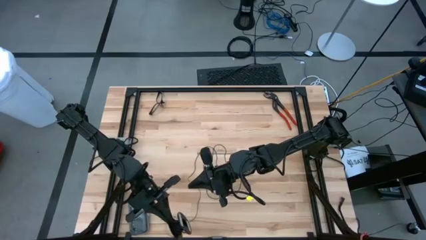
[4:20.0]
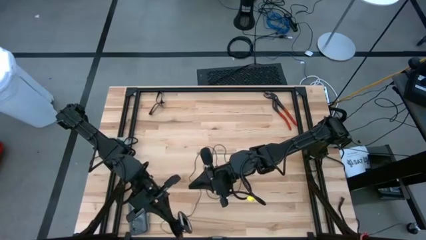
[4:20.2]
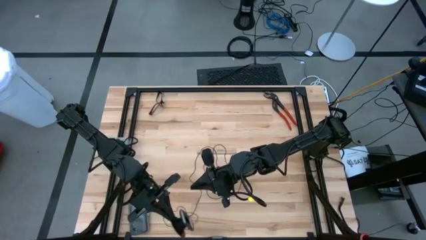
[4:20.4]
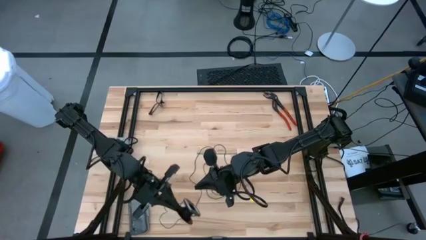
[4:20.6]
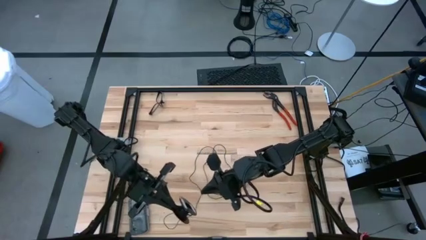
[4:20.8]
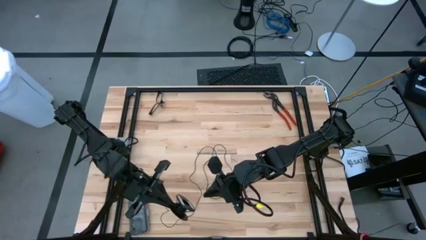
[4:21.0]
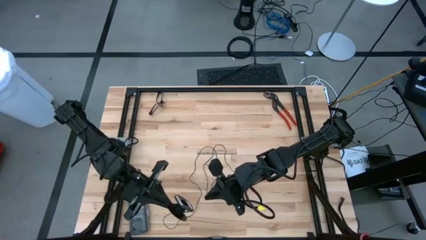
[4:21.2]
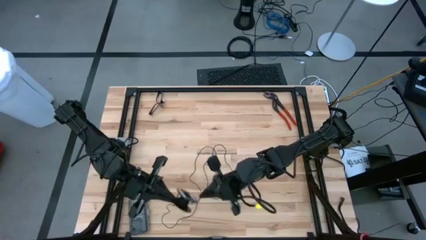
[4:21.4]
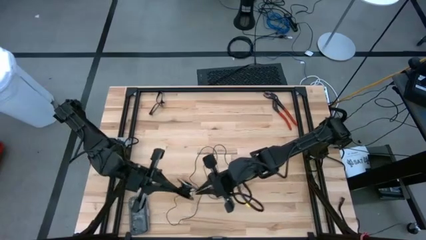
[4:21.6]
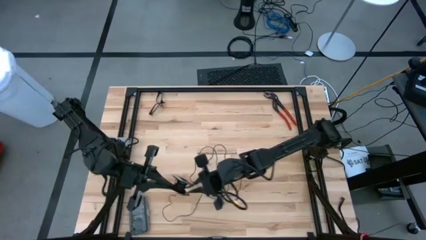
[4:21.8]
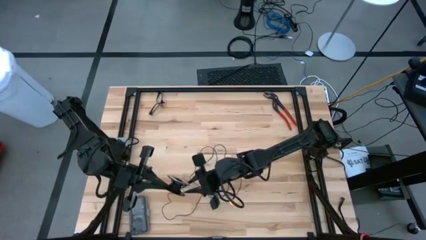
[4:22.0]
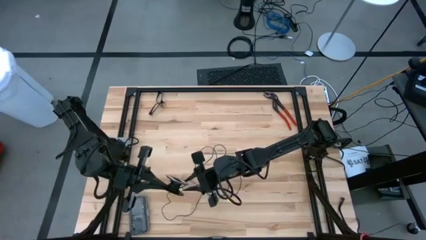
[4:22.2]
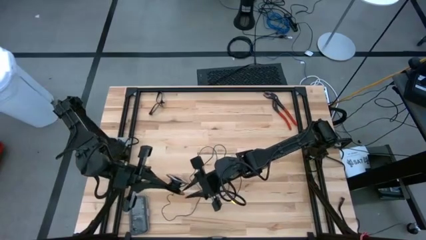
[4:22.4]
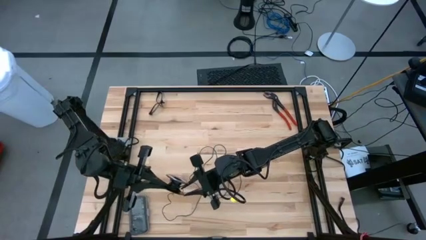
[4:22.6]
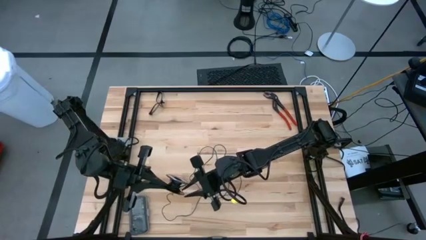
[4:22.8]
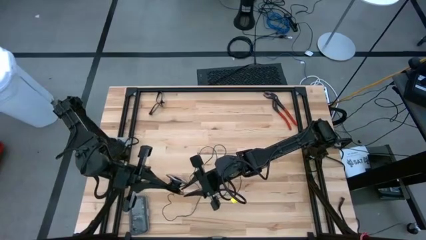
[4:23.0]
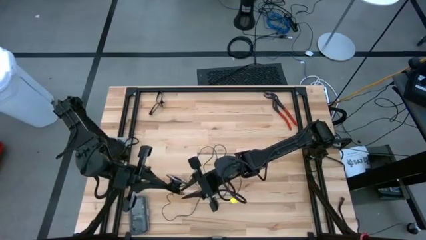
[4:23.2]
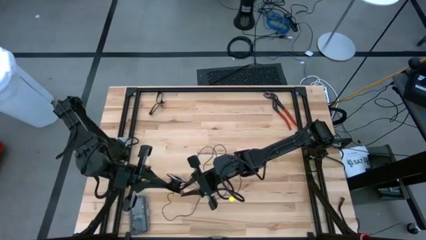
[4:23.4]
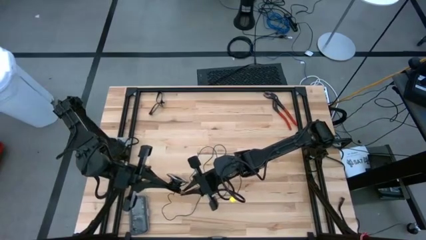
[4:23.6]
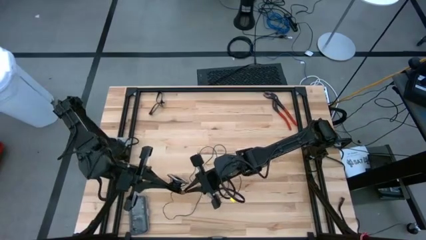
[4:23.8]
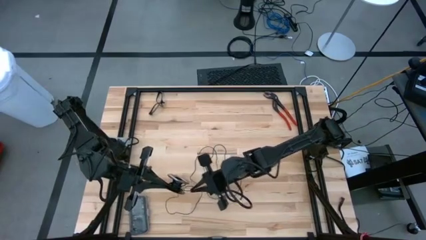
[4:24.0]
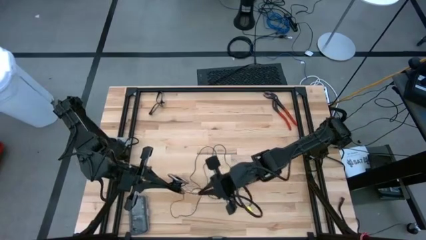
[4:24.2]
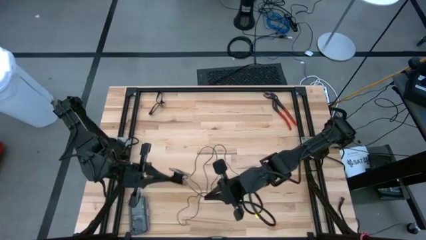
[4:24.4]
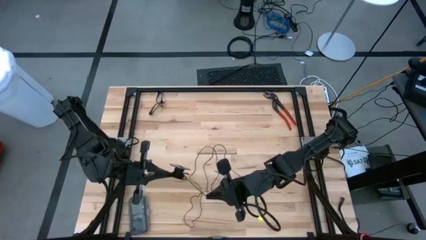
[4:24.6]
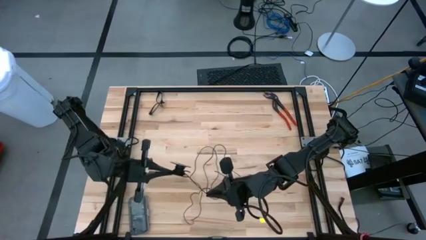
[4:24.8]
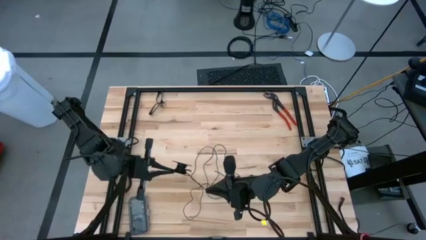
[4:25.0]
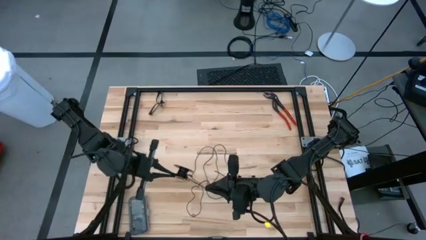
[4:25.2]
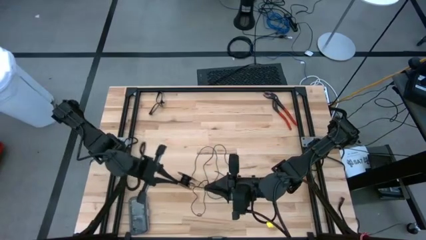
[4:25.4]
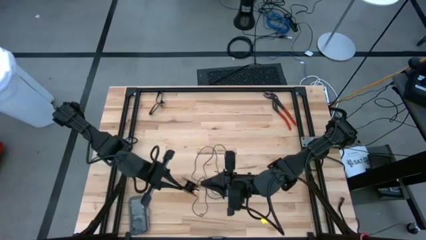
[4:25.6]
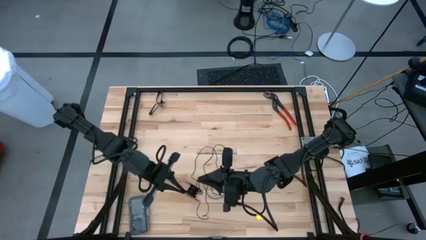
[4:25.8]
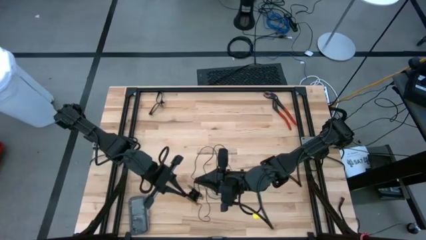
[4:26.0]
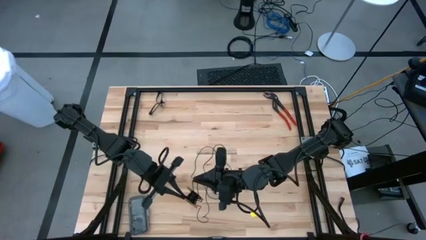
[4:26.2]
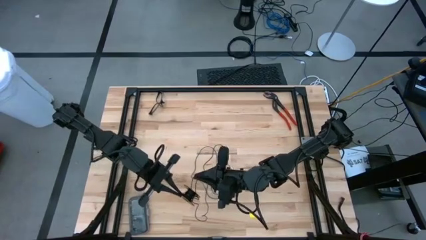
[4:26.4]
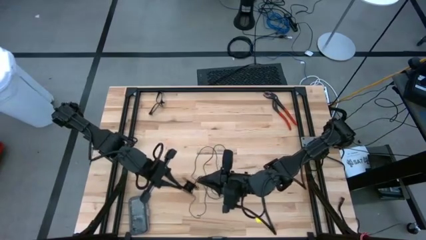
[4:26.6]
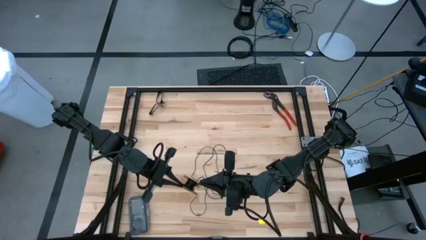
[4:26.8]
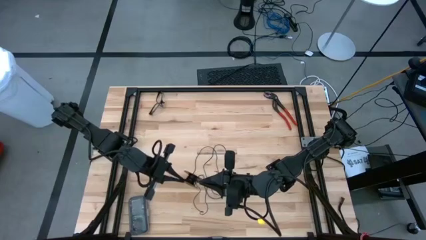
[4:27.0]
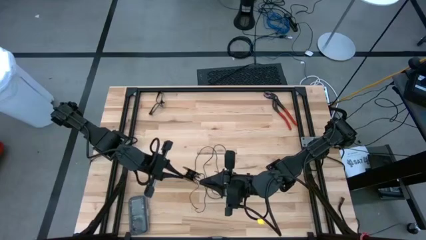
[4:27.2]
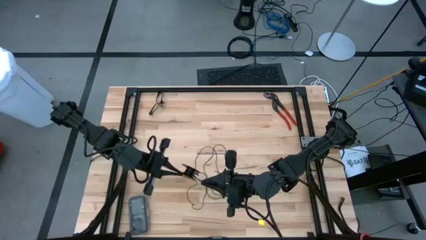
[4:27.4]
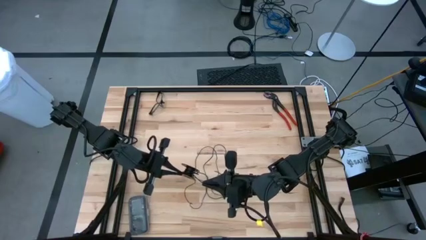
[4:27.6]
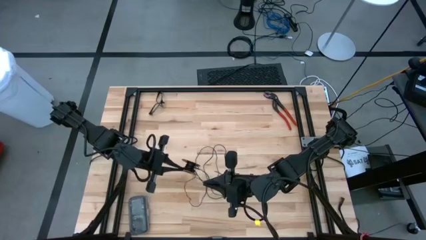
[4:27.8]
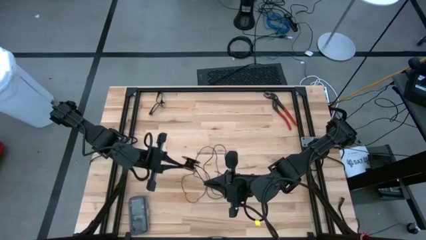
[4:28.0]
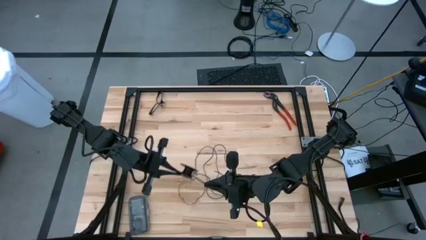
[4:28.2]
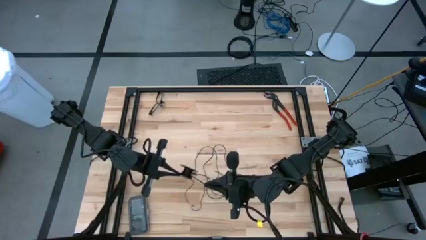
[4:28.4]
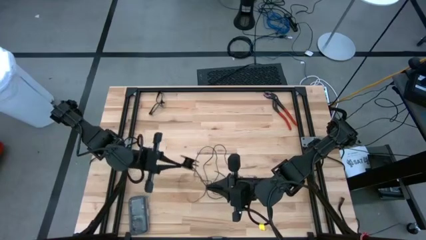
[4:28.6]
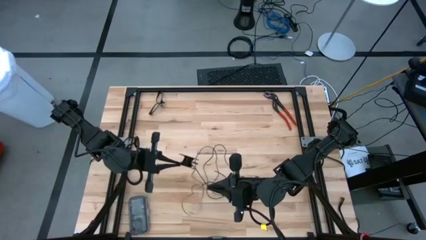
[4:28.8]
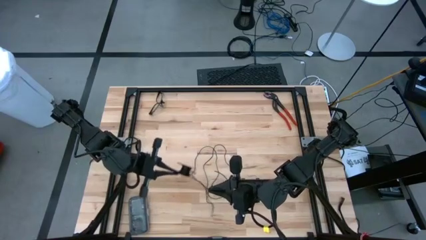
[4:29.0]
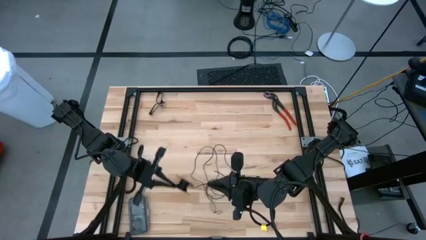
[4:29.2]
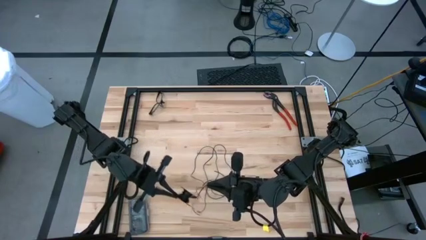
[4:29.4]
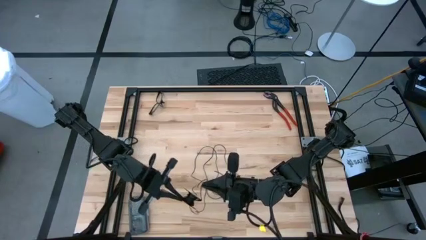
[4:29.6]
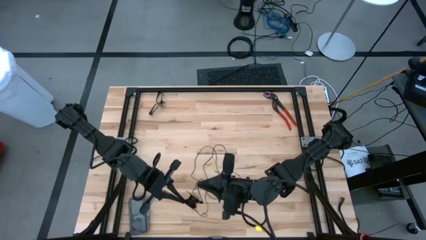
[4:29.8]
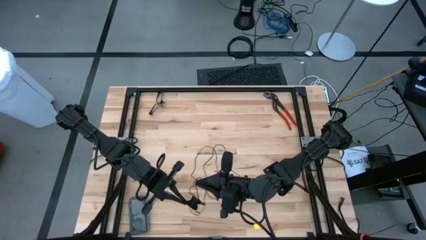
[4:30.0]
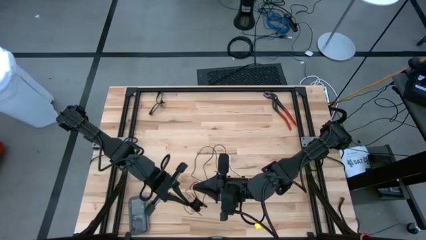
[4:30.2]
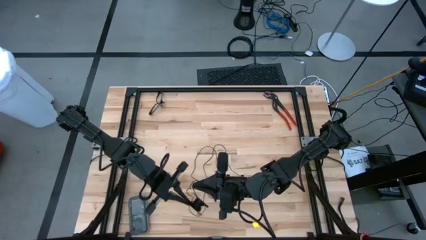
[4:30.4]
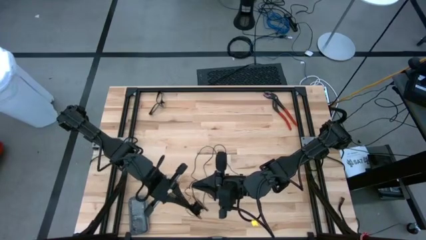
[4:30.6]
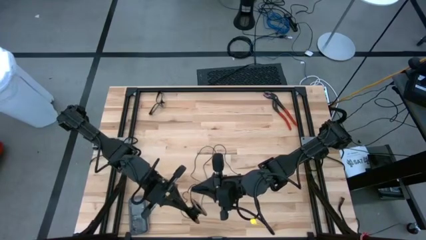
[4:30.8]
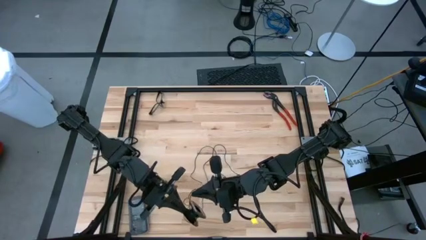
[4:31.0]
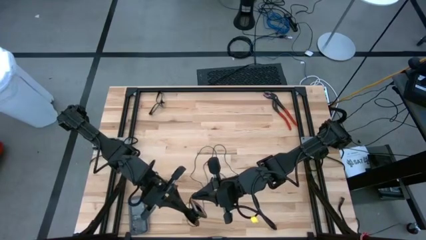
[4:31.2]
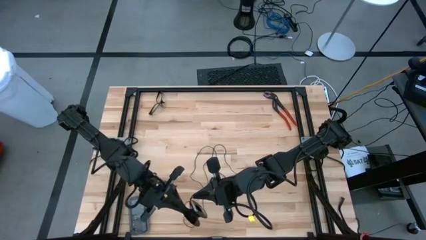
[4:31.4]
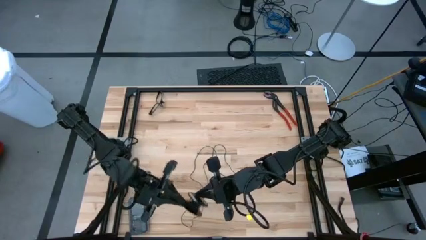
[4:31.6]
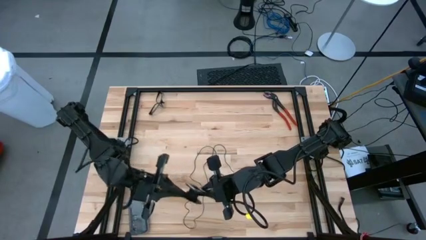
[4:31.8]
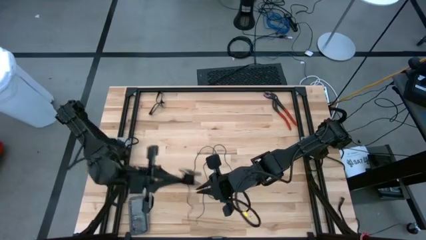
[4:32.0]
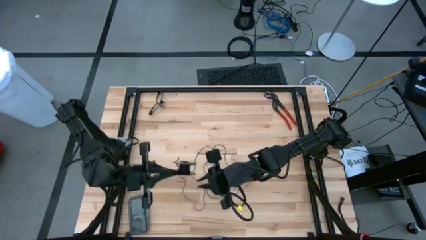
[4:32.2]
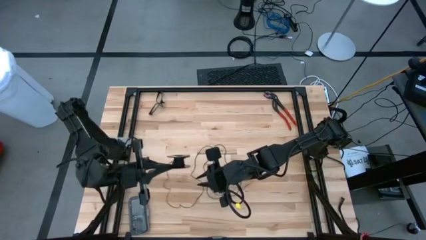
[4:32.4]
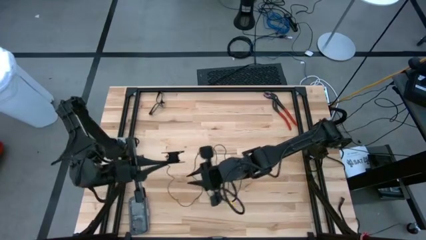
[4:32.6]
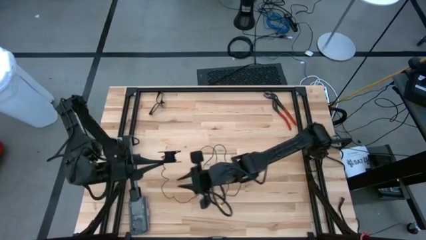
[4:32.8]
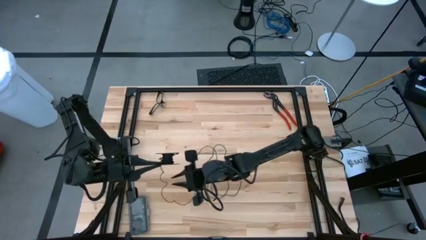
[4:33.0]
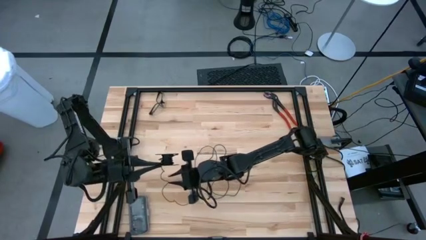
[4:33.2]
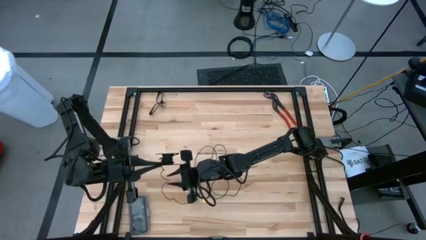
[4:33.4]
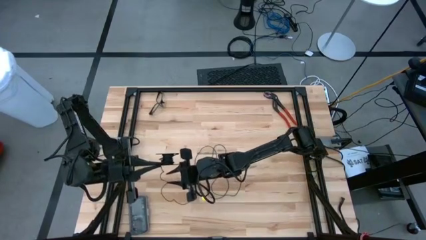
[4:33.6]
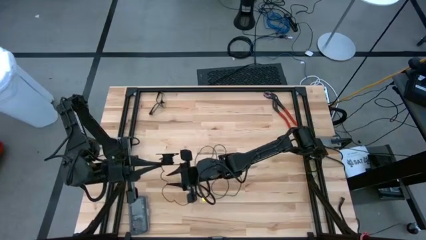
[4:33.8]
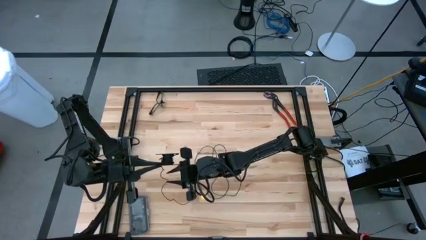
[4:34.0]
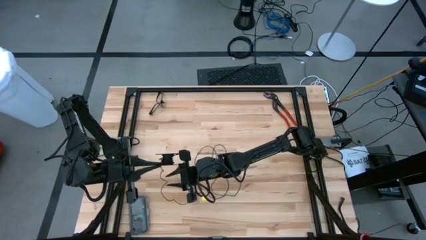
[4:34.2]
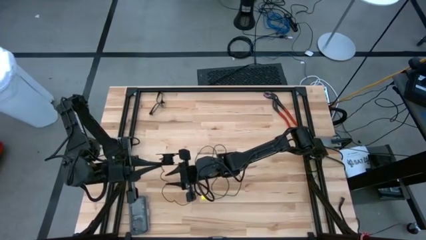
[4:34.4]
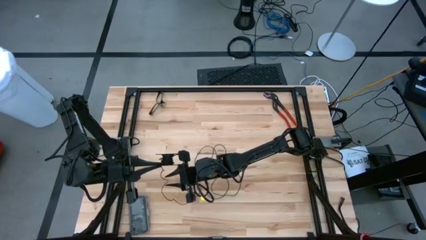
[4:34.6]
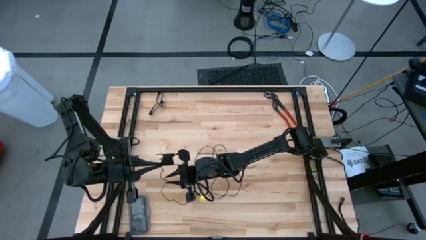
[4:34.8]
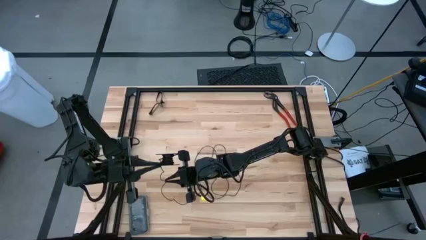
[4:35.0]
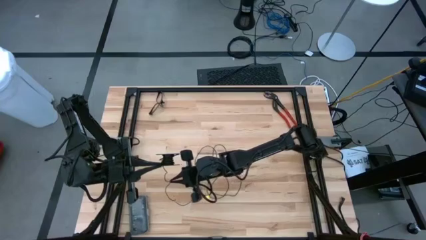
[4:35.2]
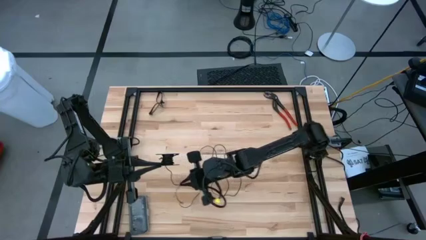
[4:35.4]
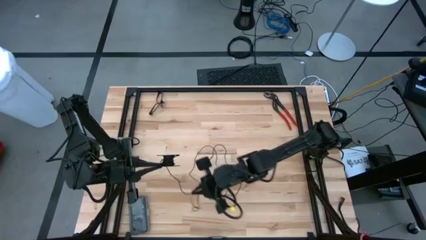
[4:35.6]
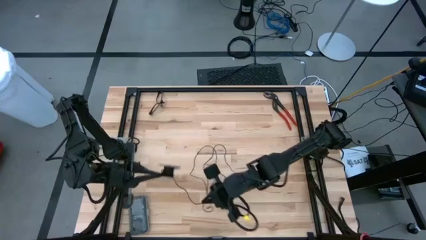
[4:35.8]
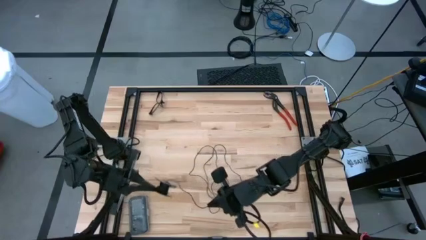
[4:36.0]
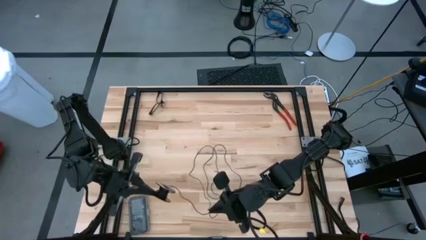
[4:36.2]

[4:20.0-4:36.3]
Task: Coil cords
Coil the black wire onto the spool
